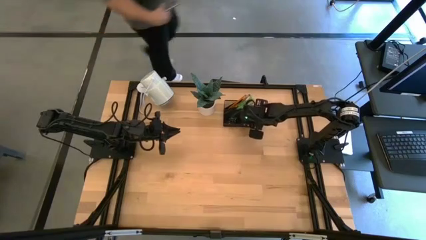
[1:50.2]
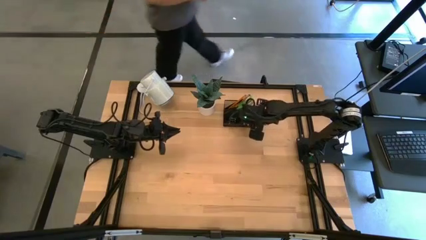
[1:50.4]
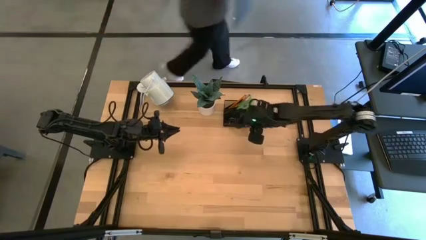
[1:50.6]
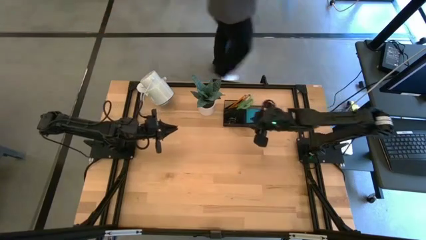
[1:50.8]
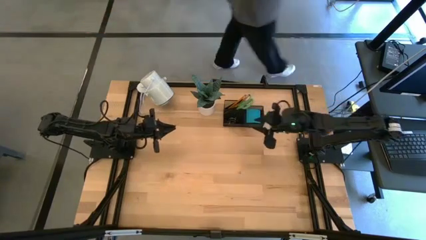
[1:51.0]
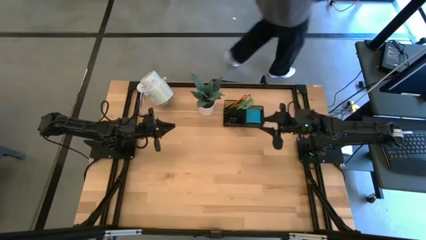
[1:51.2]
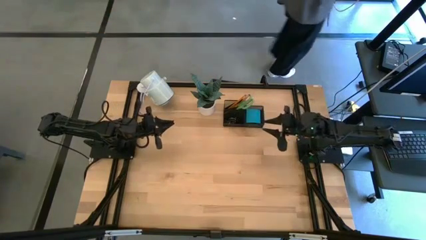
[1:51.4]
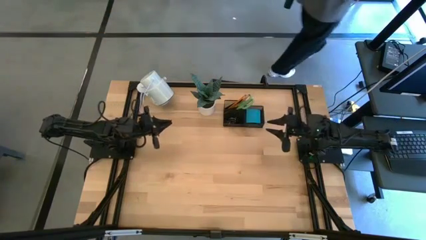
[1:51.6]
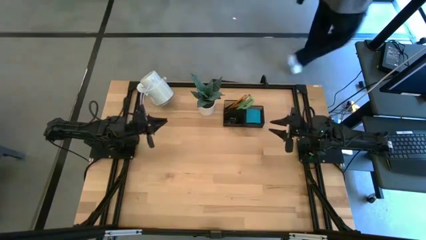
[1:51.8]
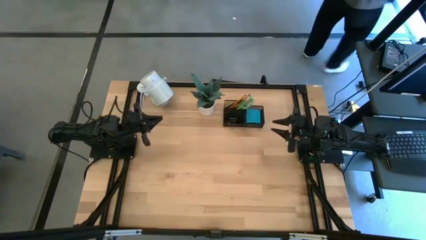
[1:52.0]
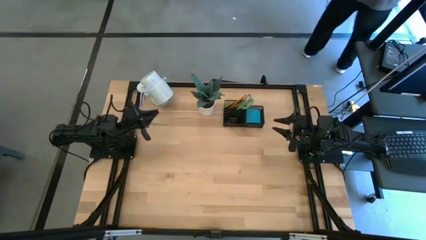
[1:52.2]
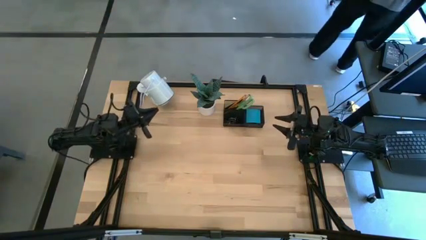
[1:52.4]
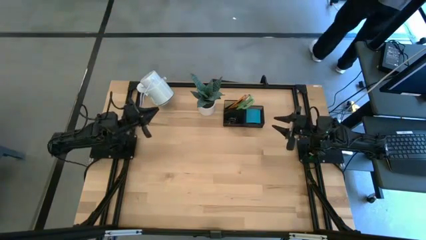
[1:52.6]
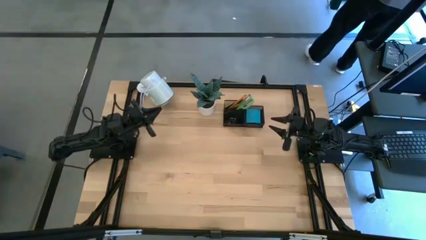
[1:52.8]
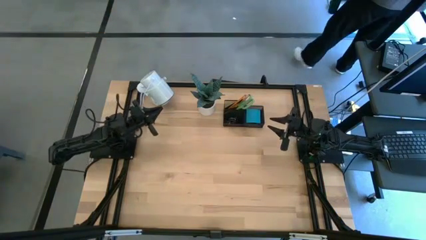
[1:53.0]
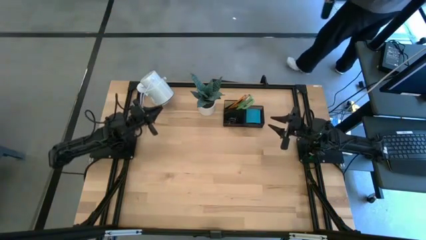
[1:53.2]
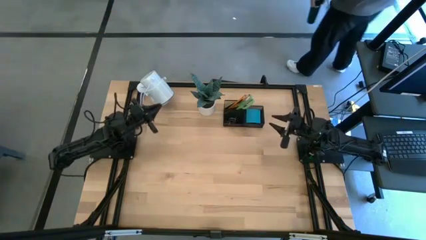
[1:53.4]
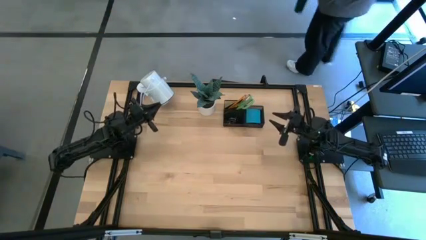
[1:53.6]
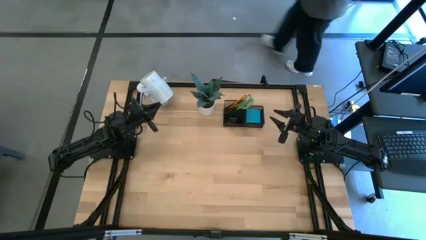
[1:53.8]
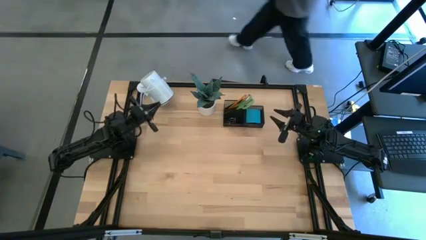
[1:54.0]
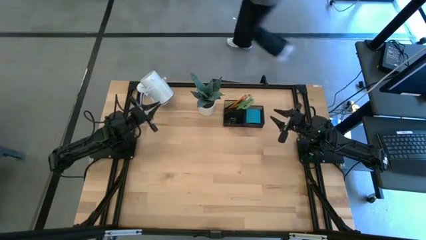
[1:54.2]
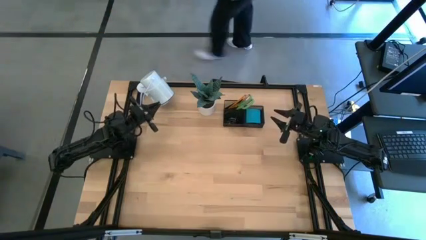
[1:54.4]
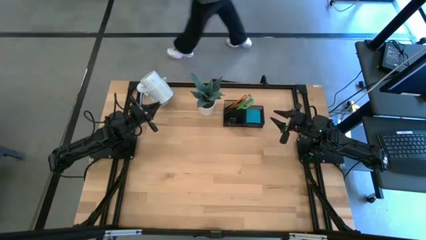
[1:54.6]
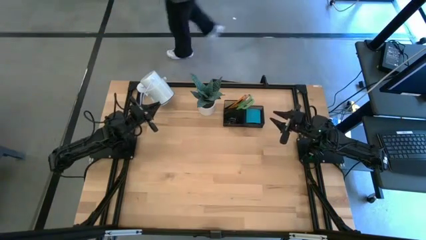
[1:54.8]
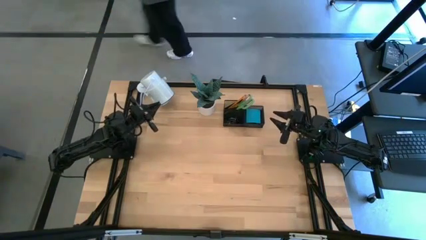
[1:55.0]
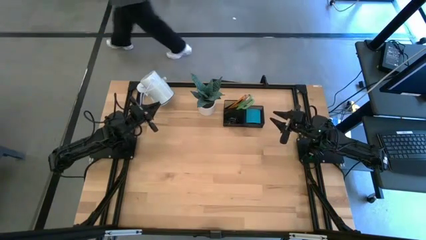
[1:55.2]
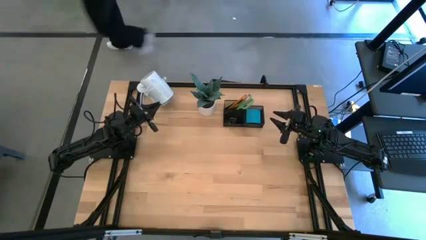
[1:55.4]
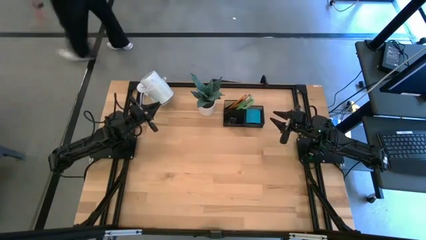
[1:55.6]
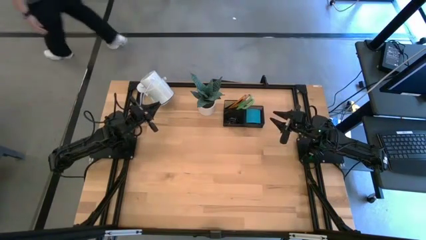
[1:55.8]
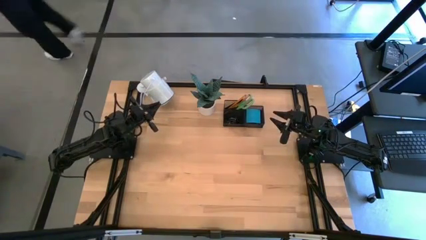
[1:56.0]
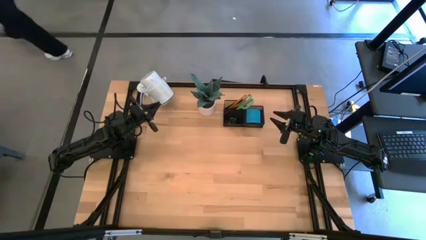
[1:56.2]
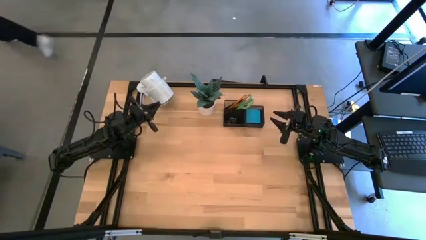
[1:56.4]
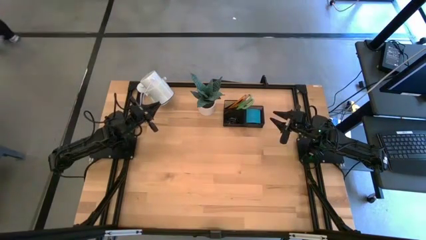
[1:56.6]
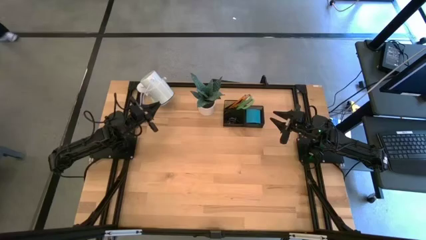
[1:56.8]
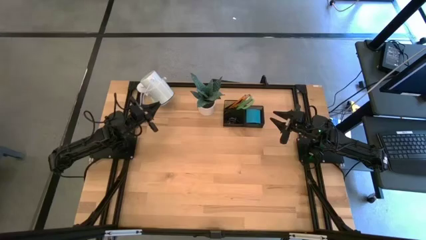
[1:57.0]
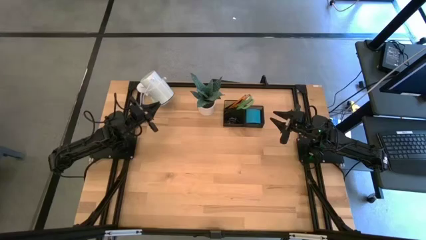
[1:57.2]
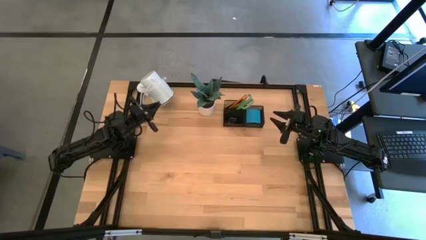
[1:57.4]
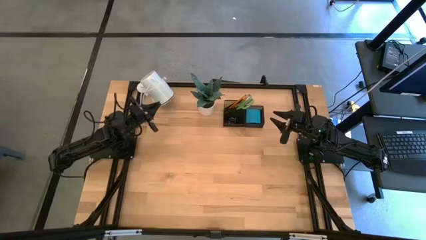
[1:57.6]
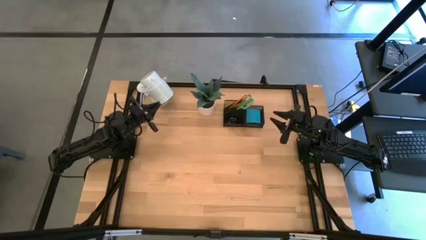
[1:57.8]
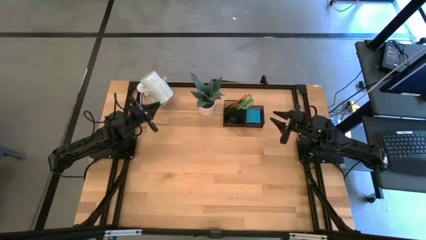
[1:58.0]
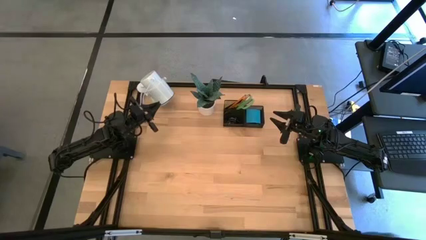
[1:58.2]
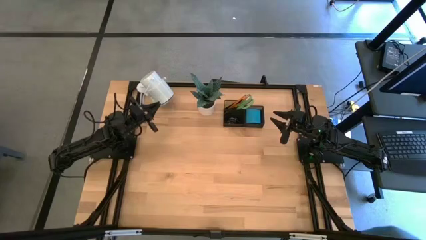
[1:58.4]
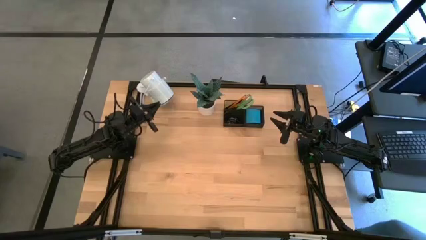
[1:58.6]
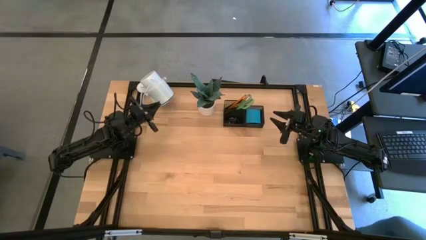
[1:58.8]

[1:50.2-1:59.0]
Task: Pick and place office supplies into organizer
Return to Home Position

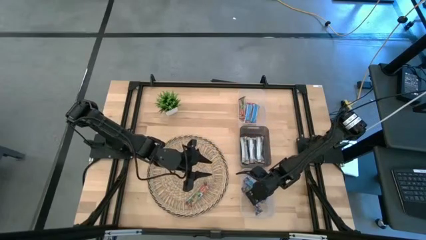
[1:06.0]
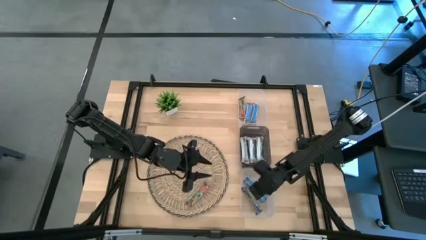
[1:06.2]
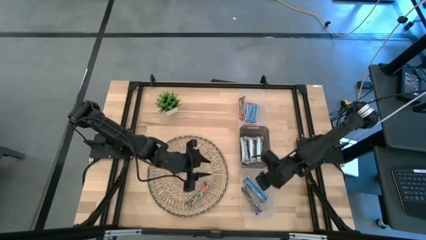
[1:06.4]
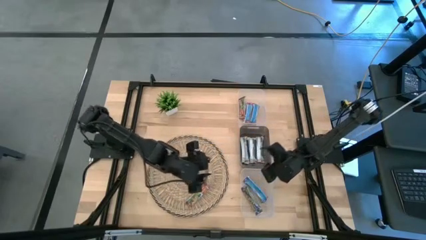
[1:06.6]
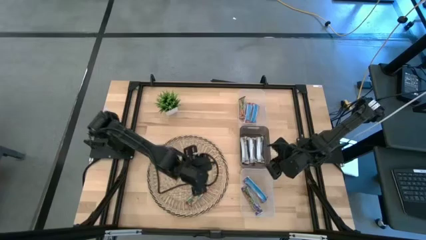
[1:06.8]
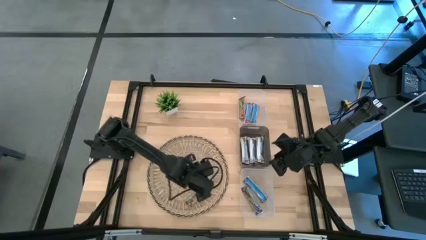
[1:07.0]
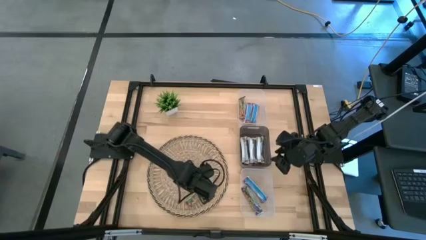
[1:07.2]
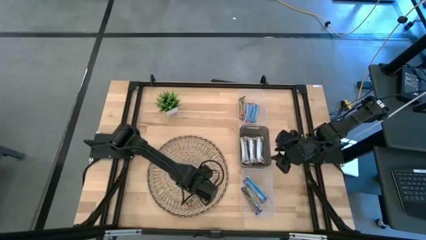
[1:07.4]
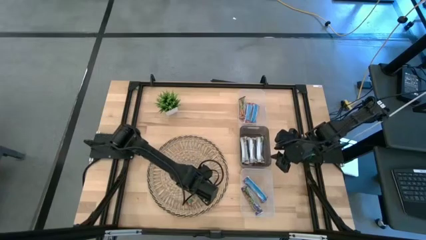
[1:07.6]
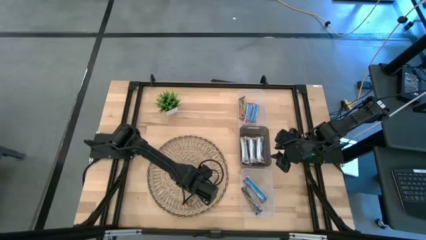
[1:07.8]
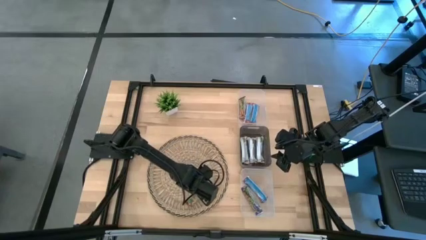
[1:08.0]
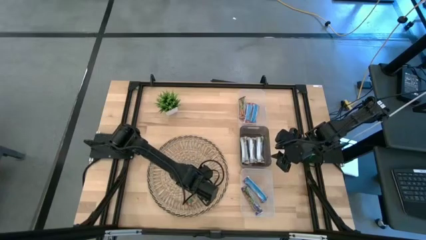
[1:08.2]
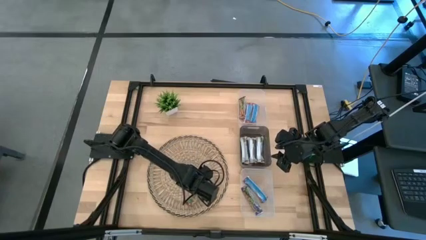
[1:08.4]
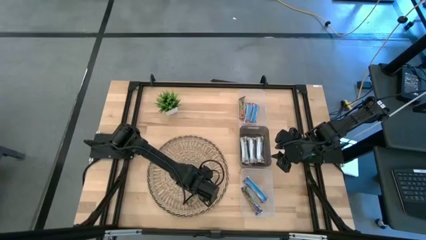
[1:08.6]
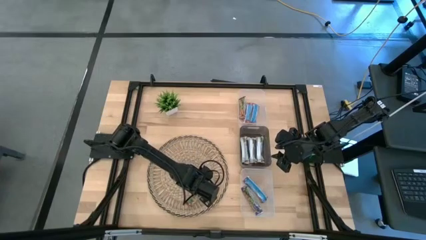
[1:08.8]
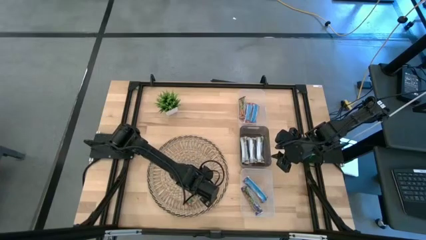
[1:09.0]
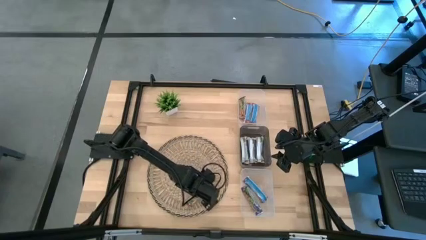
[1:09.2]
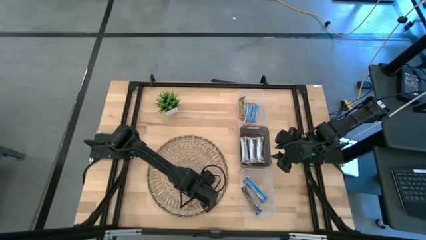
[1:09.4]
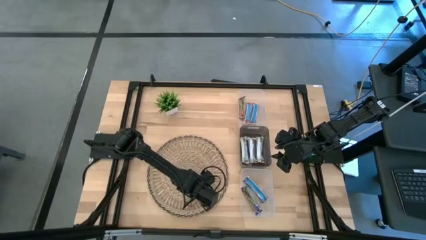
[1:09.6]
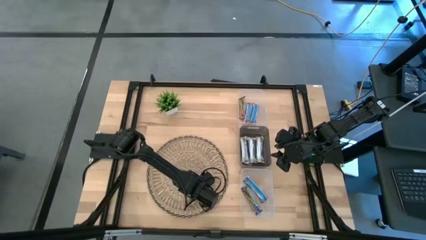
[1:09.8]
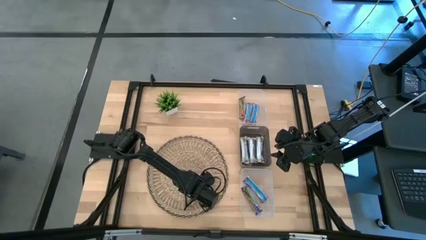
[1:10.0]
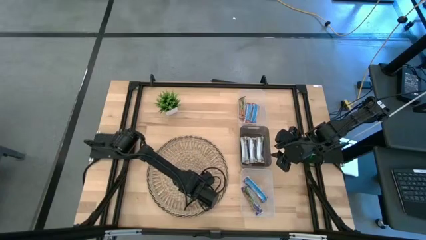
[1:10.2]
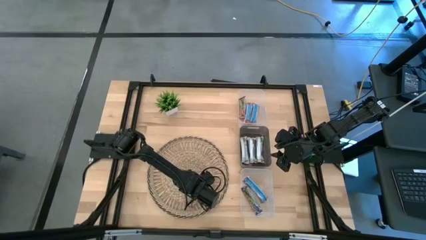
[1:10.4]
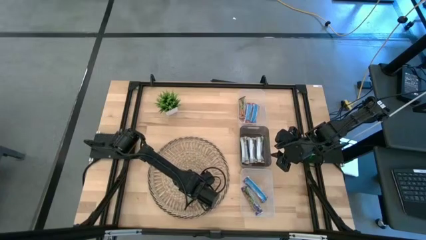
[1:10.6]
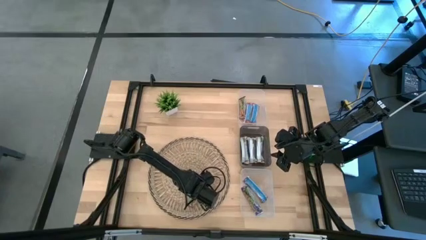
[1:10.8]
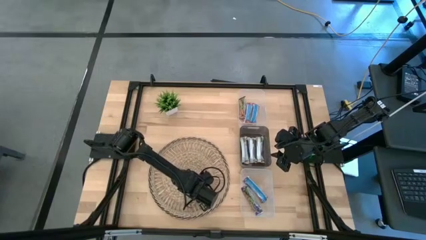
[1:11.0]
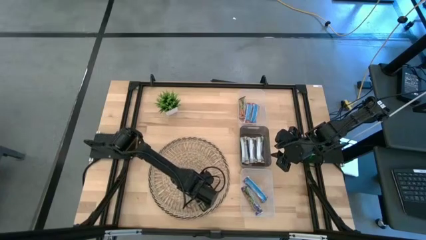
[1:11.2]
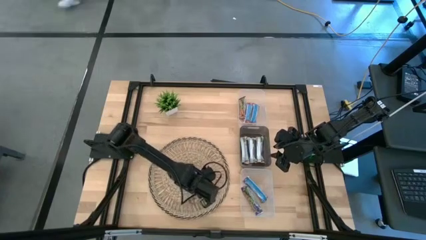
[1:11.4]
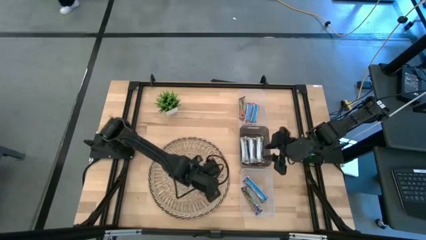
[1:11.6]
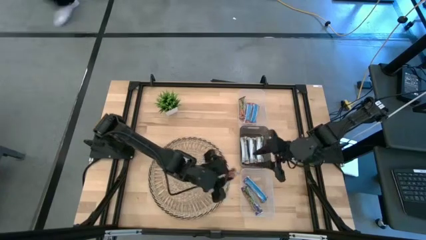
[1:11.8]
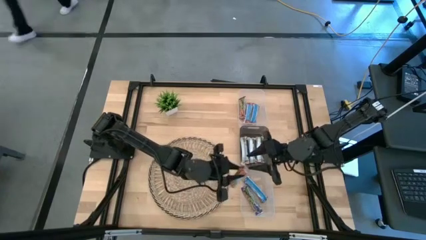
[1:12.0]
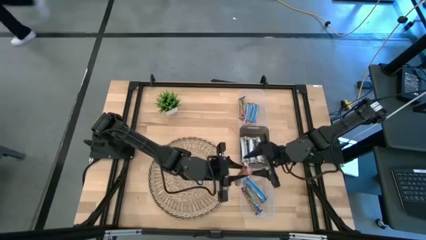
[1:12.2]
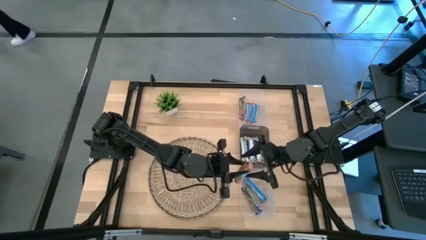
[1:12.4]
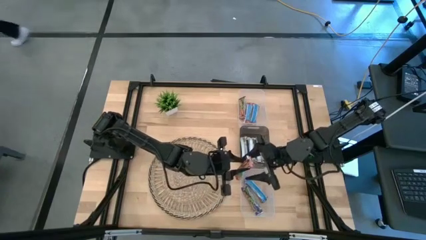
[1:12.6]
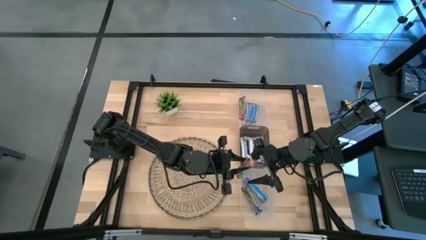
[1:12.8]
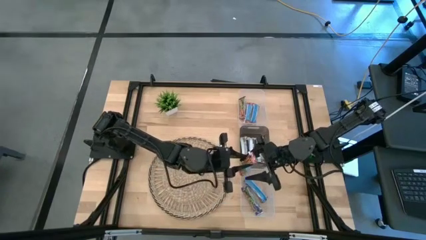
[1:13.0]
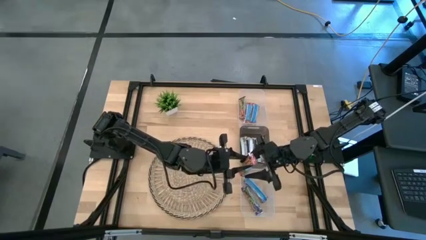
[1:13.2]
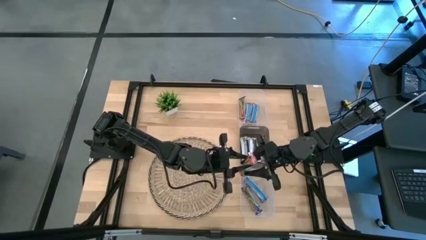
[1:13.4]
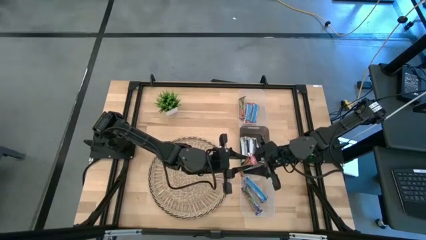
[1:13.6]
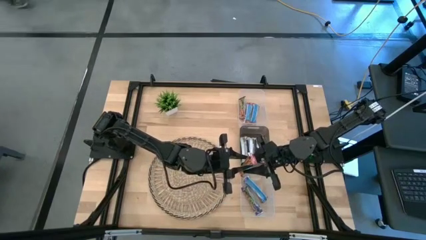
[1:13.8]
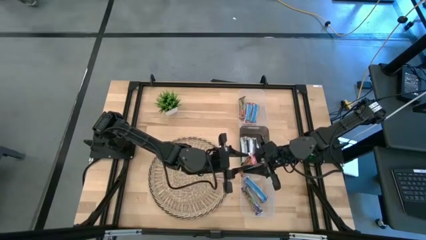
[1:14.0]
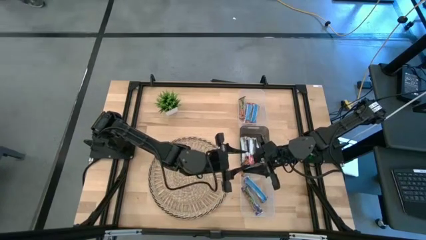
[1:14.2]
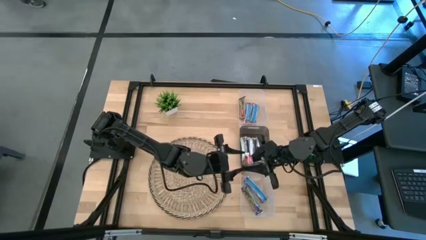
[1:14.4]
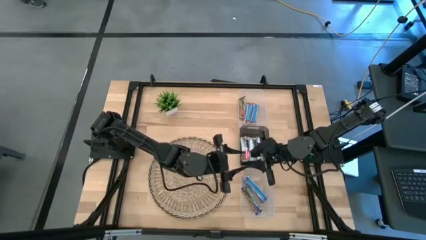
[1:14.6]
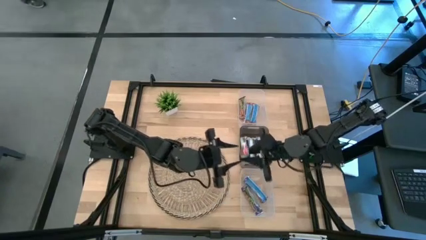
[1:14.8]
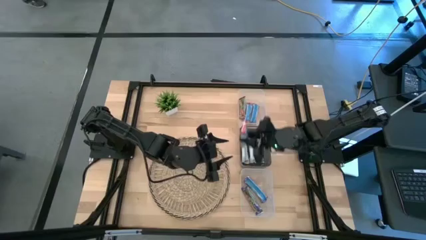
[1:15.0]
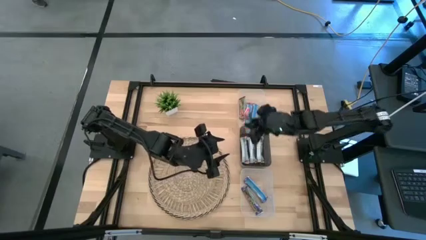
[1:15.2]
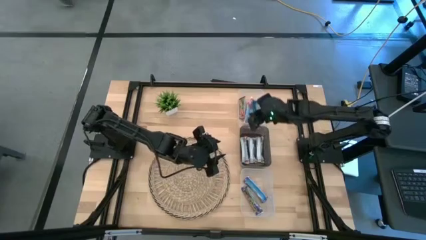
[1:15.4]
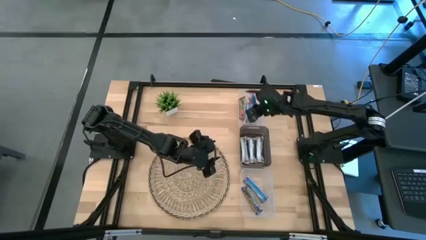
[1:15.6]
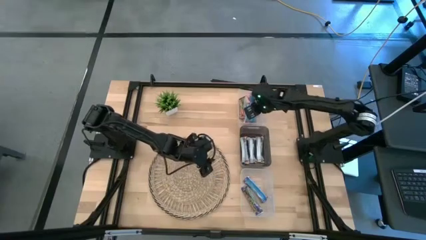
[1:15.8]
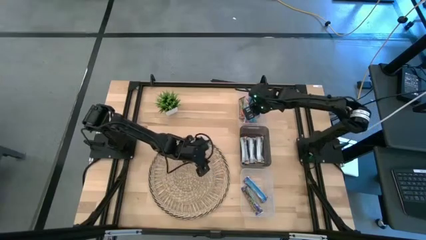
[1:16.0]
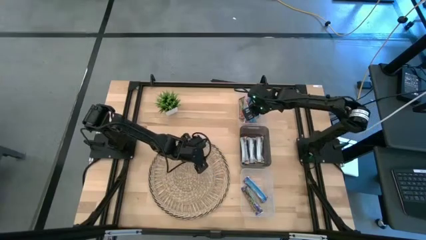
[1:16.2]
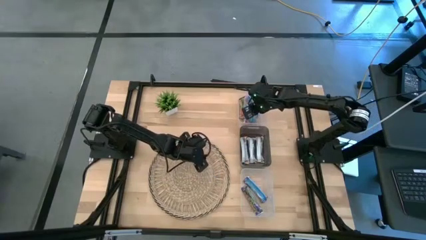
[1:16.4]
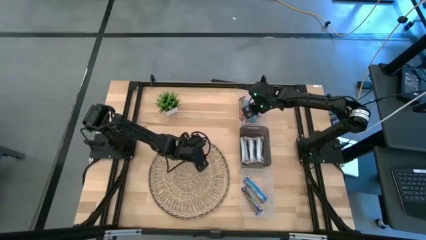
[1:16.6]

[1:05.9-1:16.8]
Task: Pick and place Granola Bars by type
Put the red granola bar into the top transparent bin
